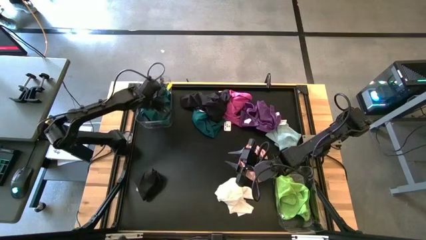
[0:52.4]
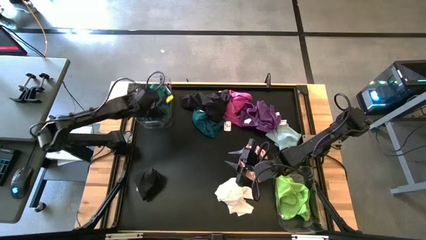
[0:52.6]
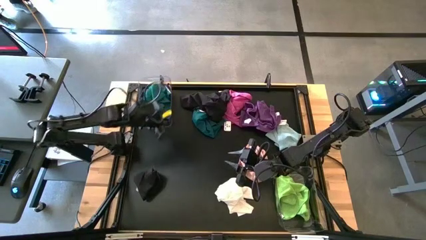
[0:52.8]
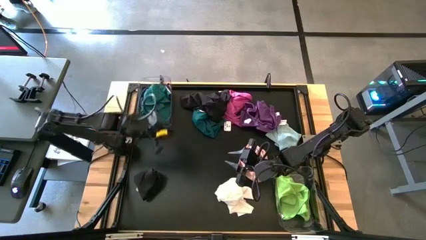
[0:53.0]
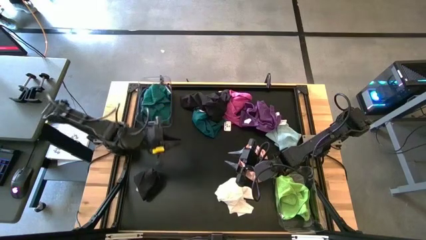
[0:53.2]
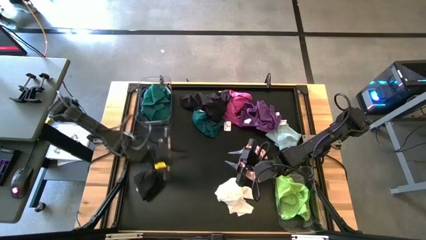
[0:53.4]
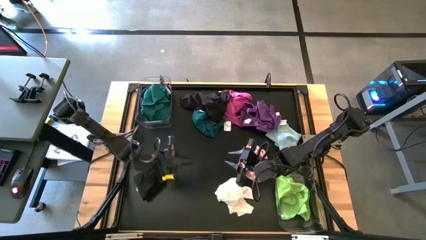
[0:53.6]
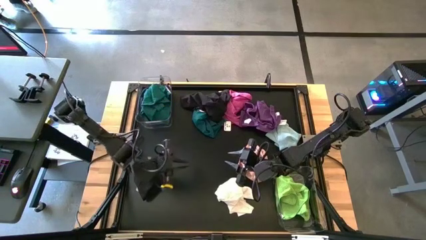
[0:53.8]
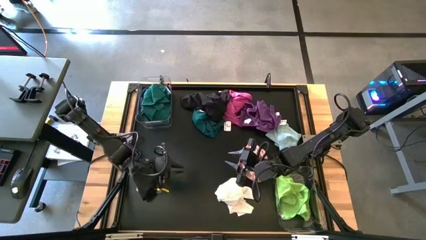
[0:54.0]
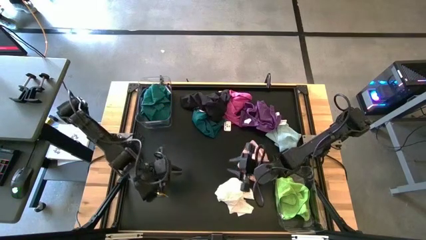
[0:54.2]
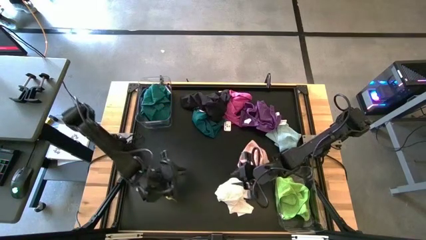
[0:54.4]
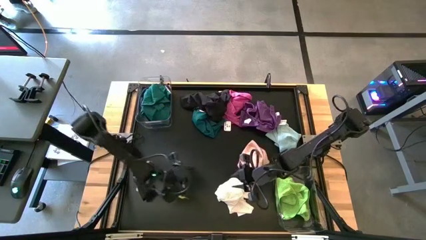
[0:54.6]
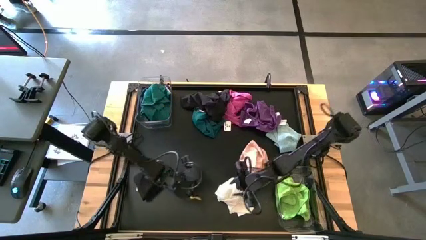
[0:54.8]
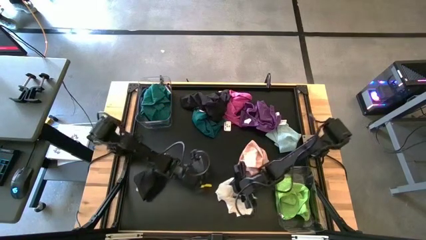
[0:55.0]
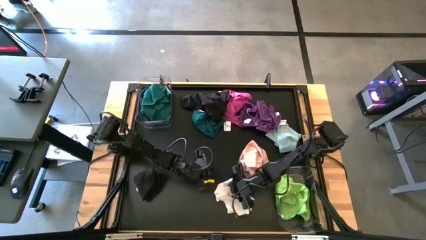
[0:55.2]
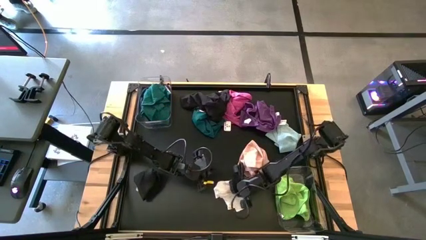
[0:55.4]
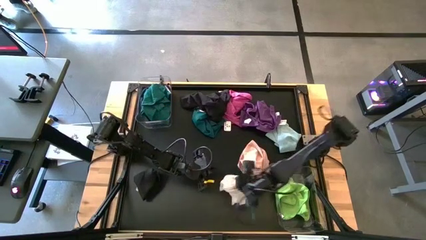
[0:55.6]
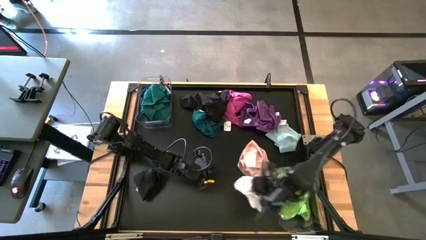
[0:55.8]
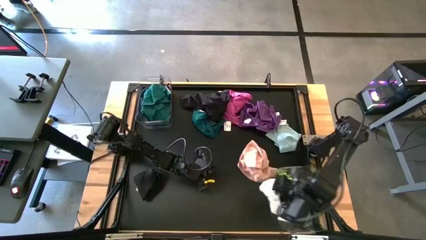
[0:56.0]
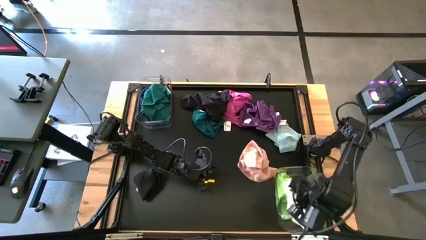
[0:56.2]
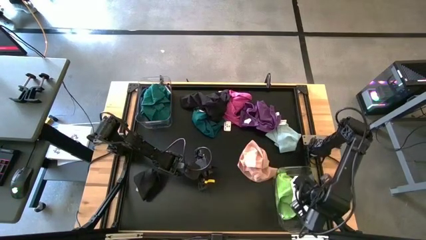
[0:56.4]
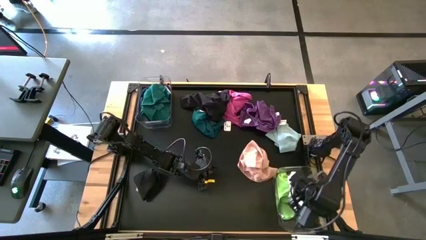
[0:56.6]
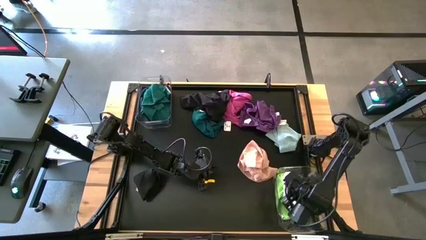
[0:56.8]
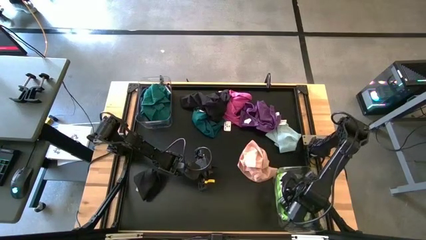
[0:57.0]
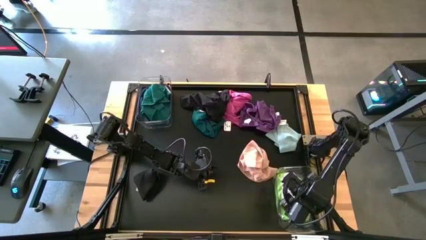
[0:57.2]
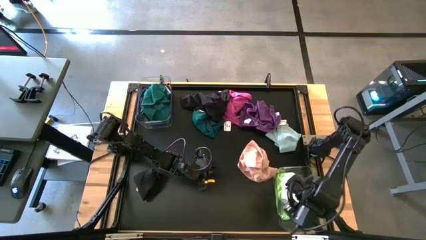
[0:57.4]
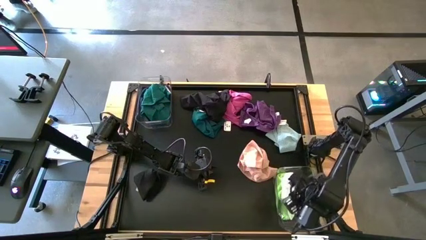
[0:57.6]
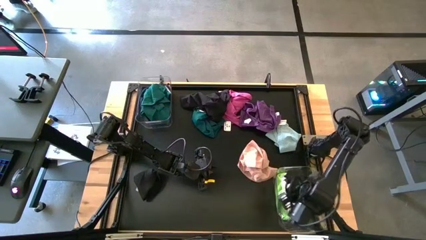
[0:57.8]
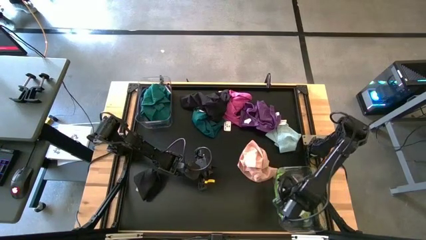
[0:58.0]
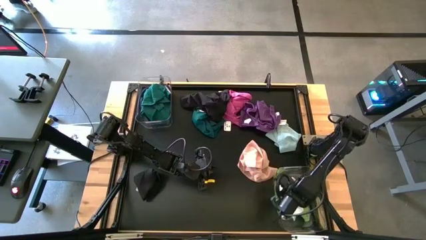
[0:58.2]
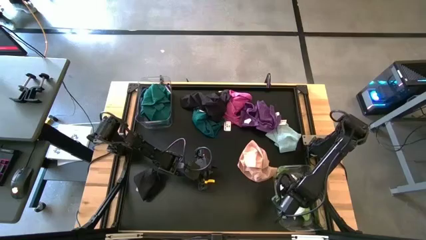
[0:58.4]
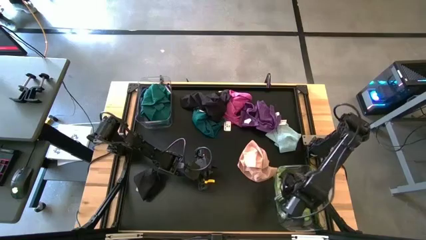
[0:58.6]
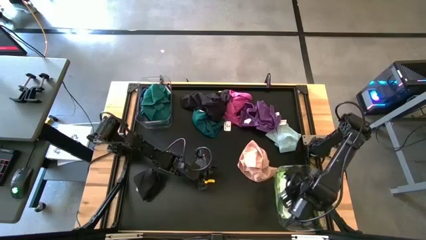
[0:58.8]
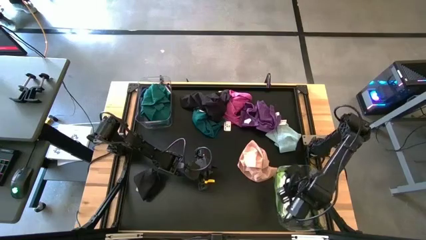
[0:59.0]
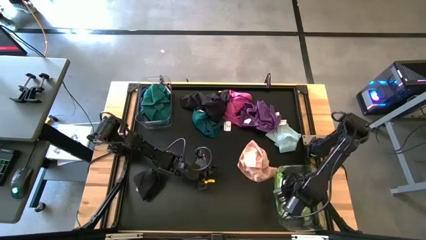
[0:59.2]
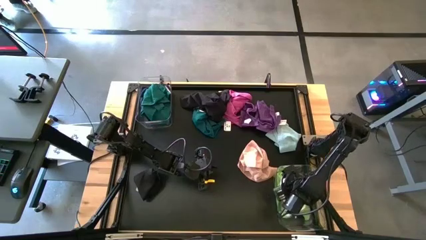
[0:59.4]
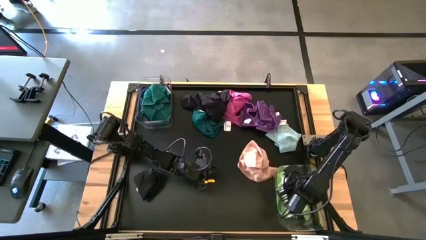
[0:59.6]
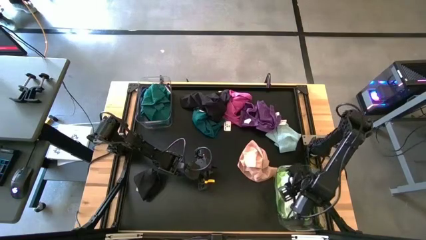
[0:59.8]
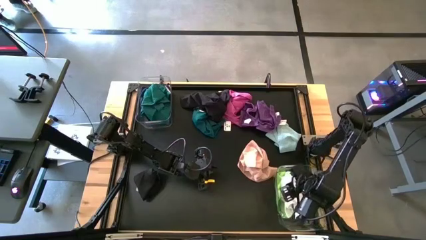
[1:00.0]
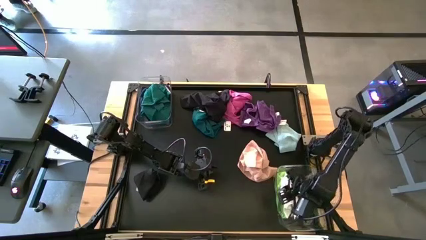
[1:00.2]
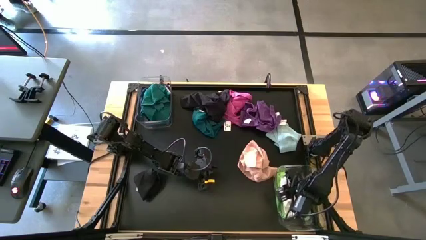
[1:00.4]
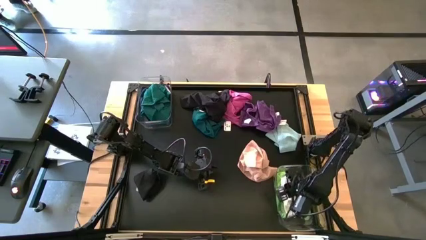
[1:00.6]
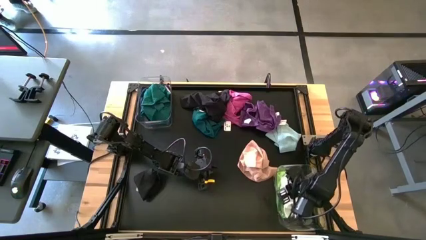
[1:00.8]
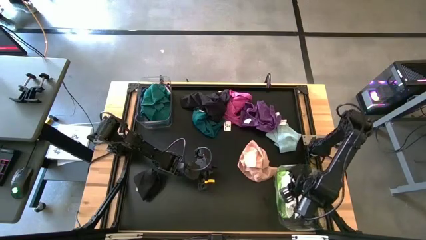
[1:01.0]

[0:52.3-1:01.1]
Task: Sort towels by color in basket
Put the white towel into the bottom transparent bin

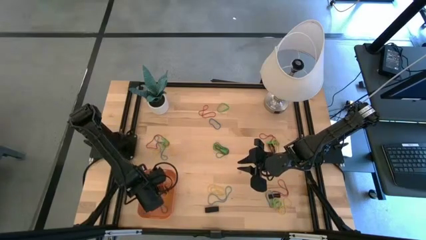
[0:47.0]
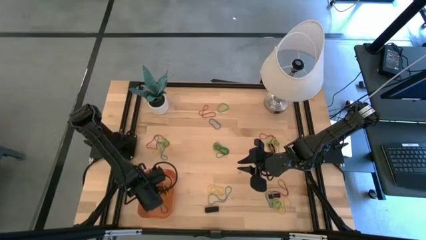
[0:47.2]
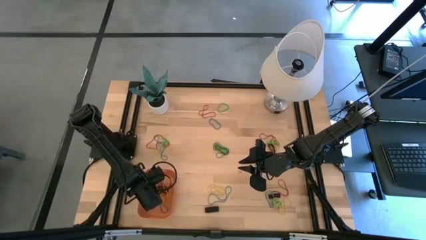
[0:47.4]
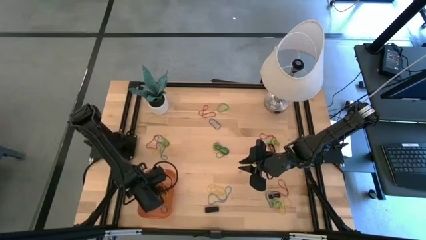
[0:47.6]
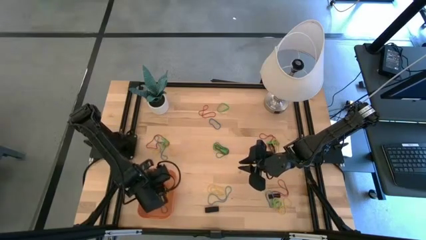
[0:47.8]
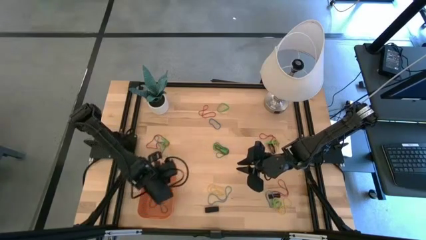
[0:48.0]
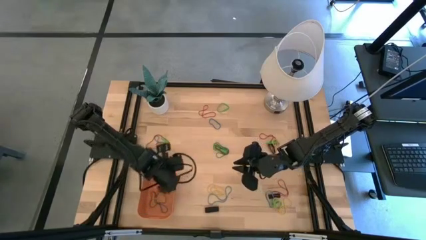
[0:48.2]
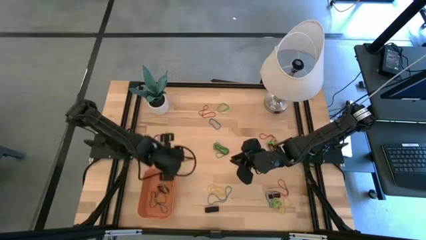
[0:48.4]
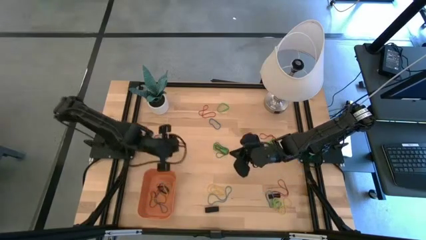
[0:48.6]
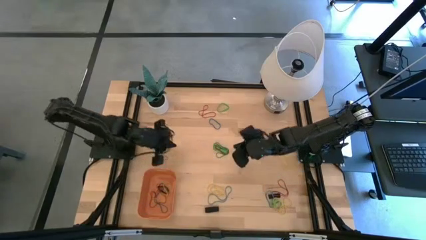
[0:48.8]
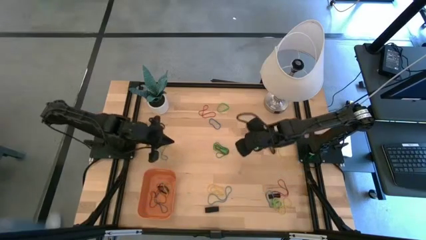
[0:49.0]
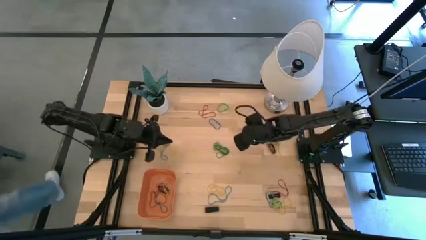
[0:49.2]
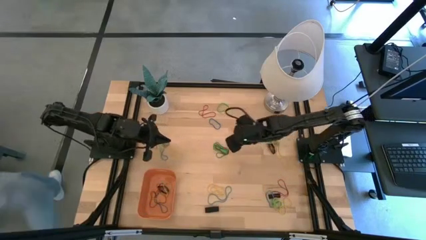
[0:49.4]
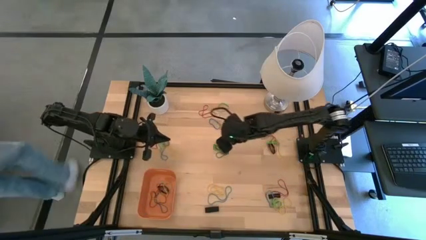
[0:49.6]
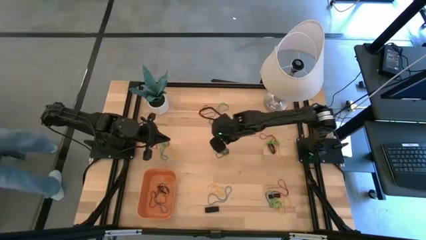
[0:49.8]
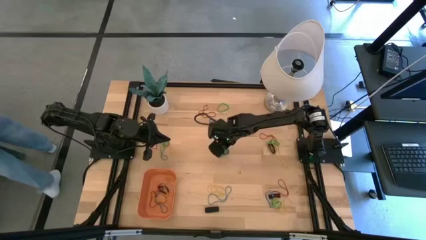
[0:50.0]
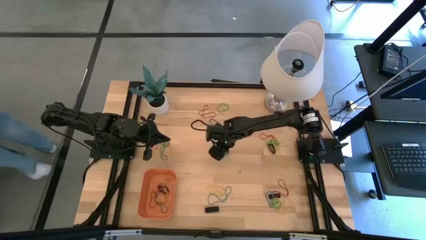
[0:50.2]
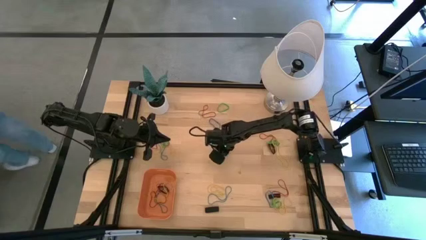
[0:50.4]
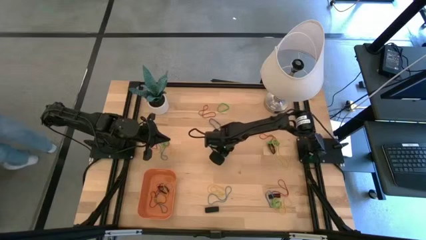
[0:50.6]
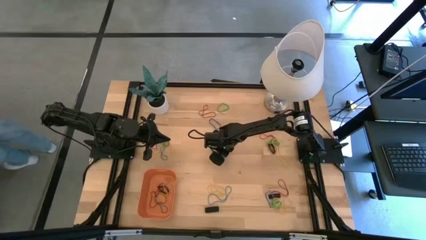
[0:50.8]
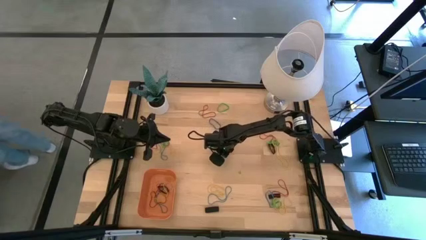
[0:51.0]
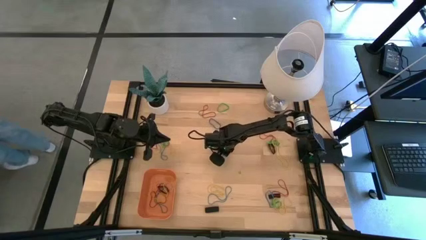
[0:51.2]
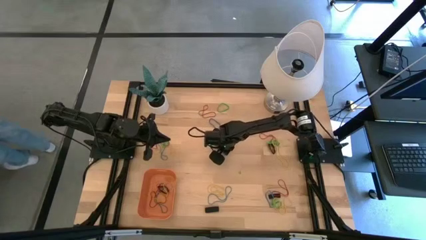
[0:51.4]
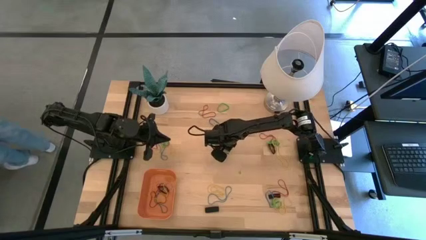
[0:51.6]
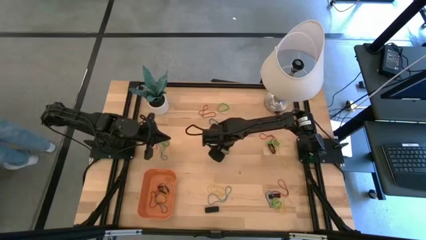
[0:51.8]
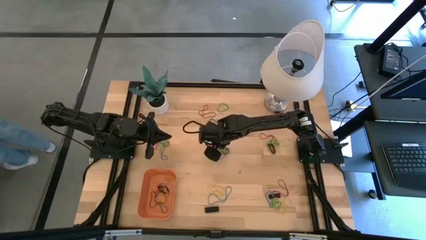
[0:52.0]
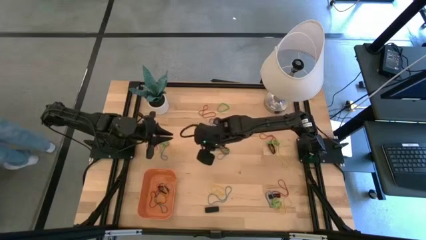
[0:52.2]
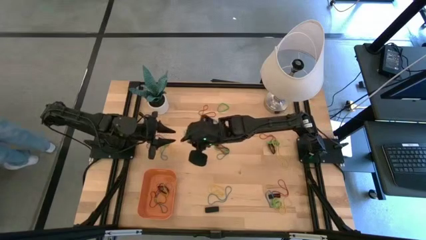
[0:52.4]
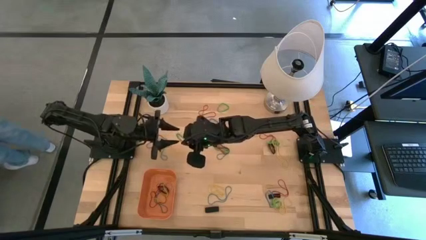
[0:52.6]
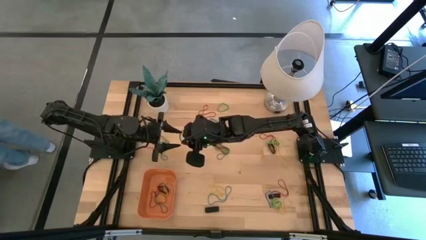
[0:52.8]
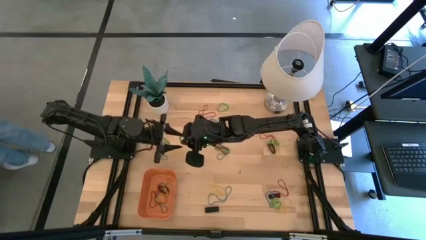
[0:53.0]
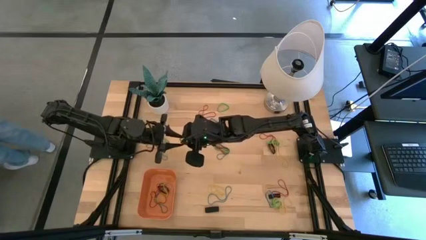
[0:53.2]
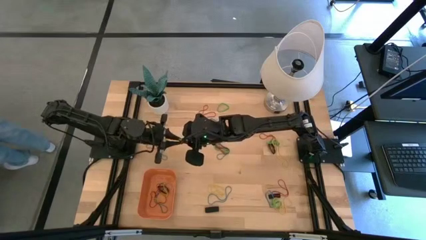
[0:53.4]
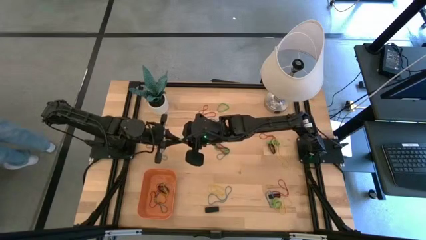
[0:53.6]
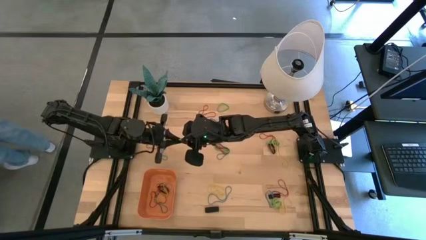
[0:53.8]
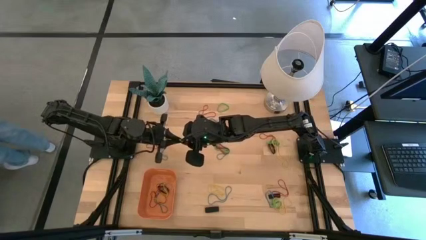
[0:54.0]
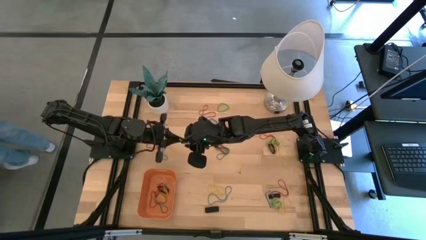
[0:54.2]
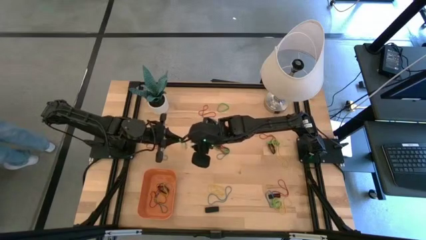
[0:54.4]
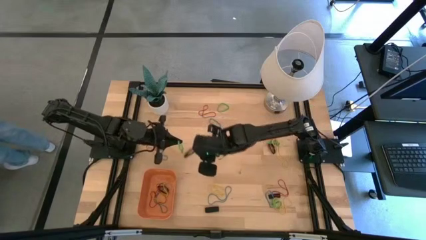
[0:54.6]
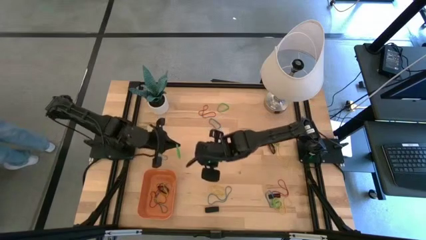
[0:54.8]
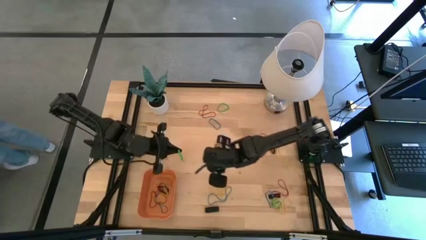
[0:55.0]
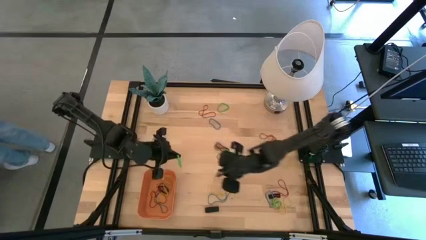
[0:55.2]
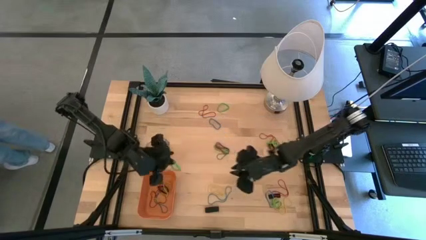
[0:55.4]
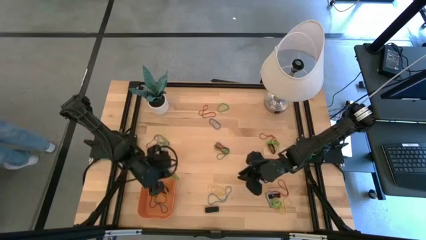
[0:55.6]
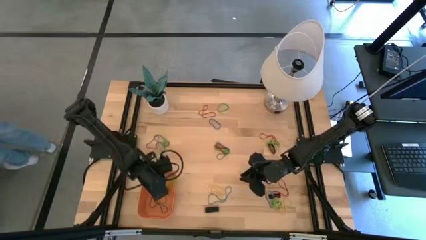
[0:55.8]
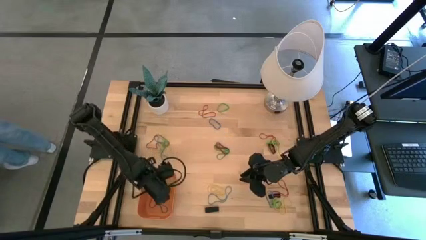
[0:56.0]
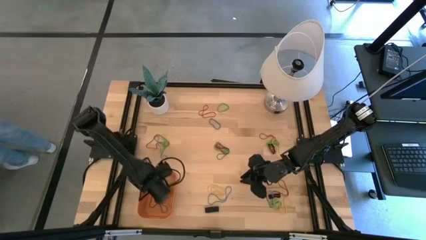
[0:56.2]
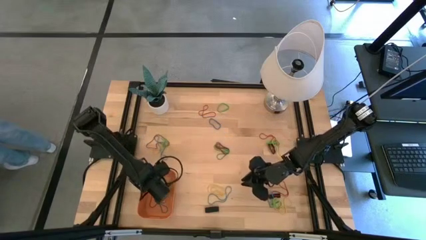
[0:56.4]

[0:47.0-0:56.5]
Task: Pick and place rubber bands into bin
Put the green rubber band into the orange bin
